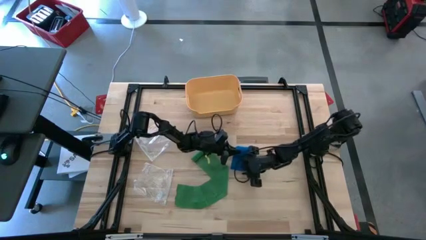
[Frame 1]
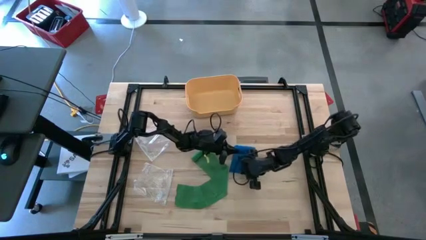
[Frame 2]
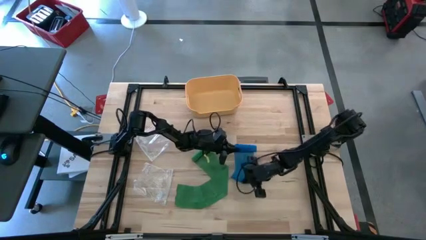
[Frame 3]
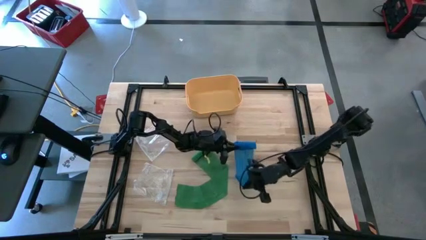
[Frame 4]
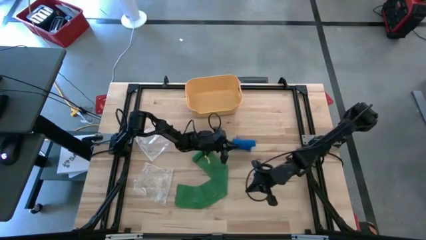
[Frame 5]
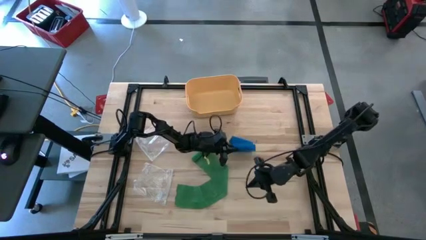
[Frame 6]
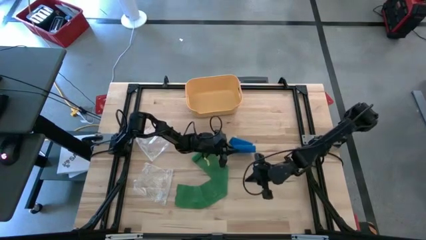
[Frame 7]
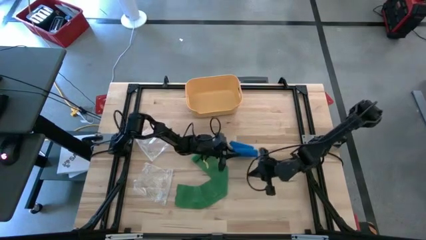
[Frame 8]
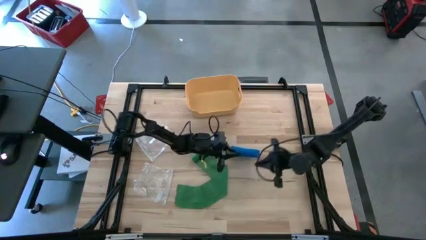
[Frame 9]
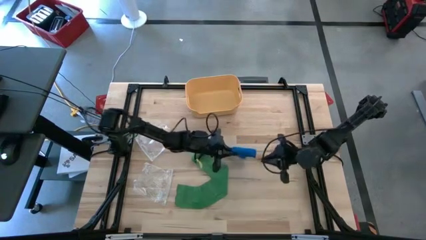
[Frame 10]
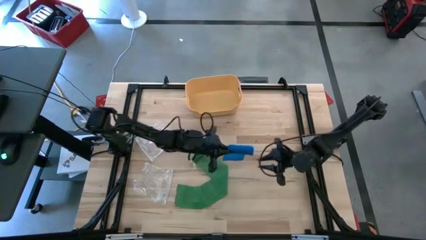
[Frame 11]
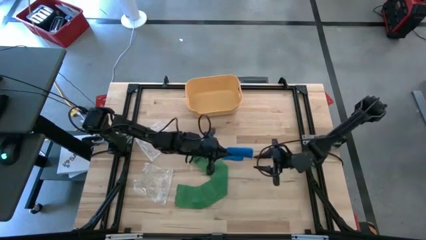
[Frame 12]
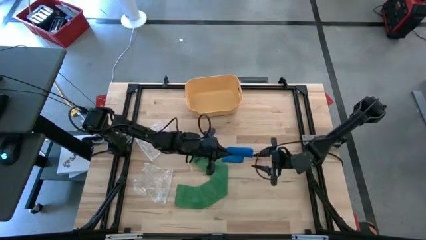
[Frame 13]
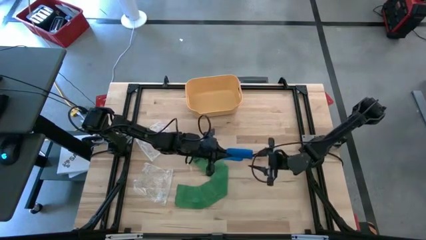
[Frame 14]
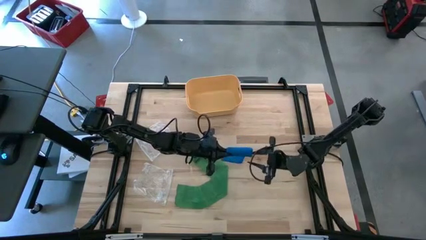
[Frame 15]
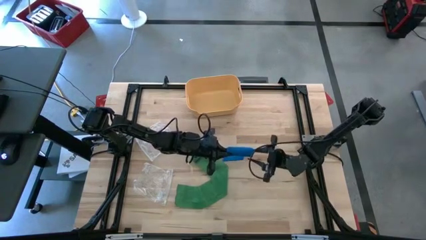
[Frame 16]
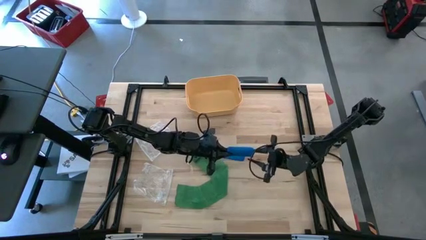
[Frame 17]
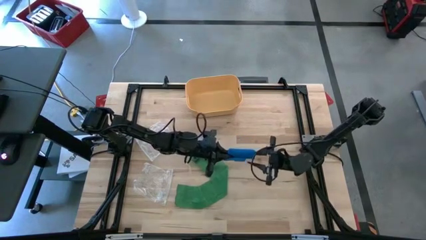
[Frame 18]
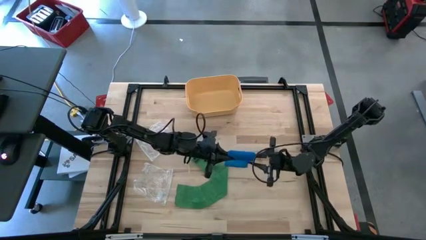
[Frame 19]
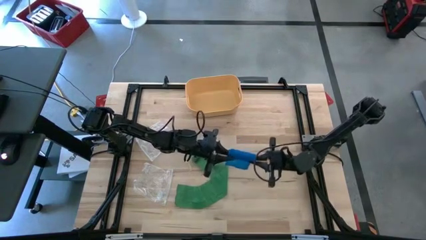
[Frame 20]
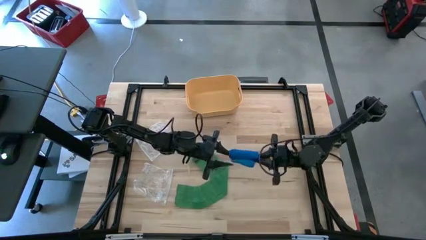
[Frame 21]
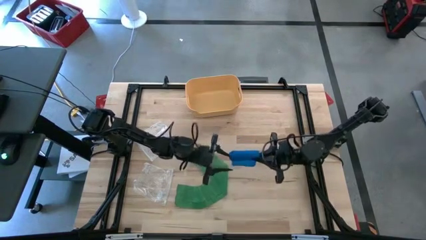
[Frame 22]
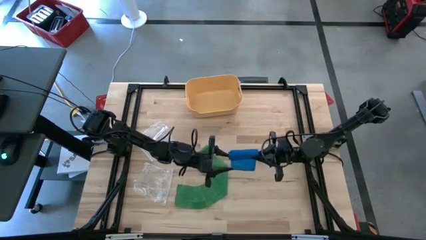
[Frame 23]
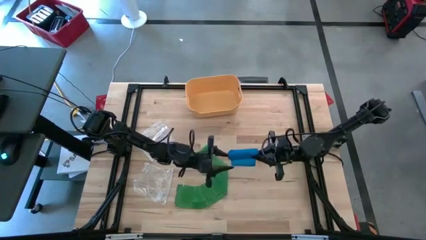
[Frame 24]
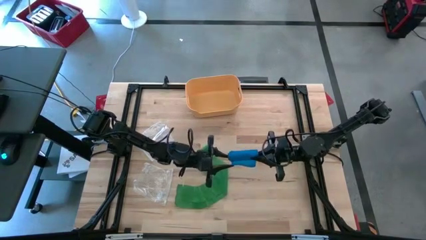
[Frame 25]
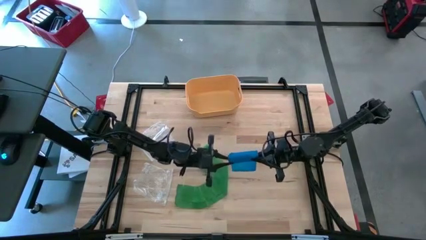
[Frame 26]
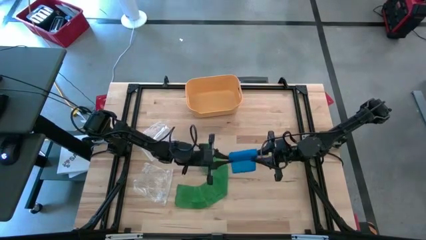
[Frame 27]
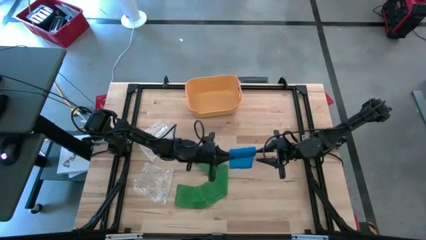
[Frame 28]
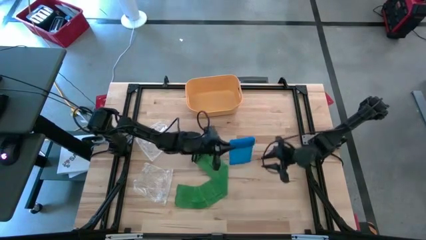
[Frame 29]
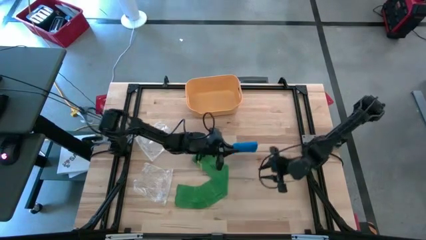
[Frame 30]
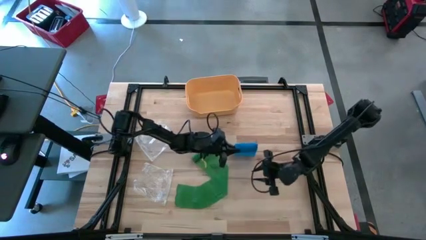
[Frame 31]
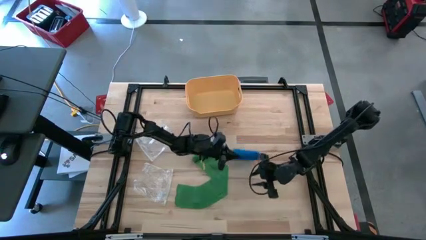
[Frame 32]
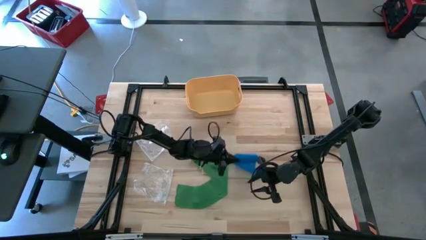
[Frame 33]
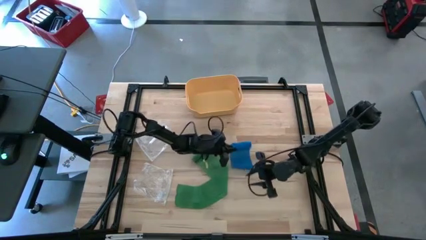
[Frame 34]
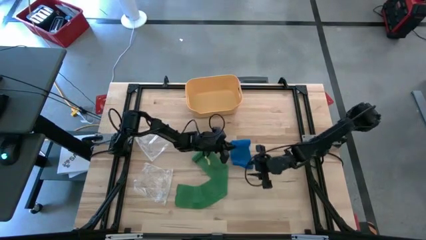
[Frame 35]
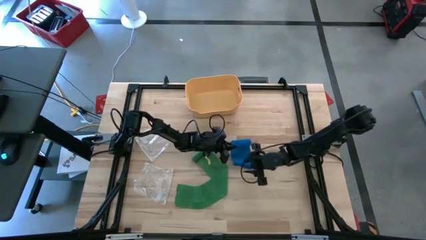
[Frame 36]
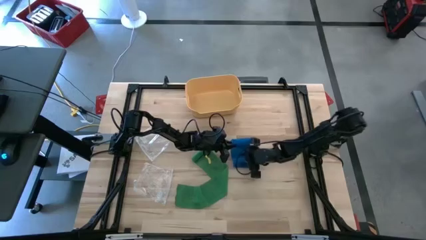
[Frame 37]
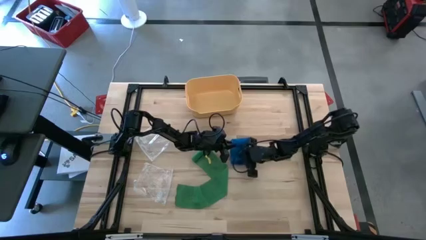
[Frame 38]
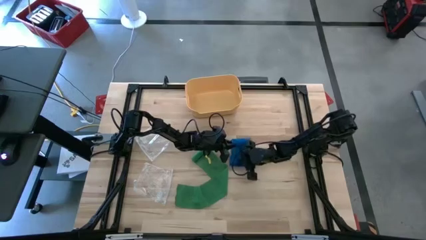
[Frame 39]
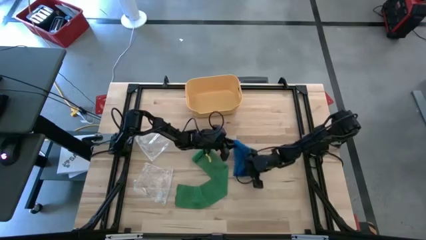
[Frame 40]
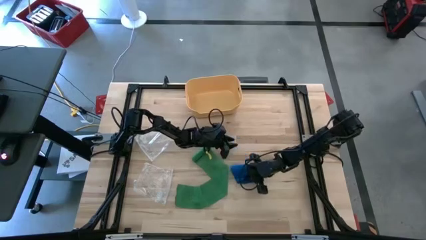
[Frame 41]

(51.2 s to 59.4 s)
Task: Roll bandage
Roll the blue bandage

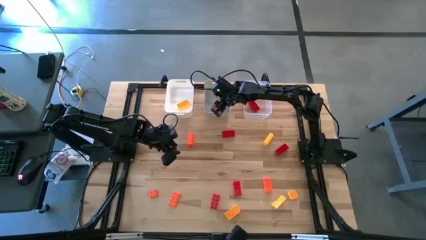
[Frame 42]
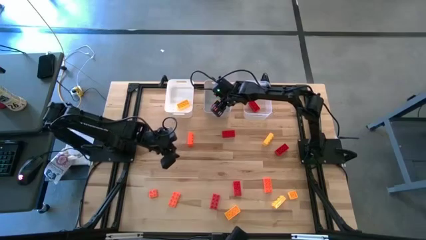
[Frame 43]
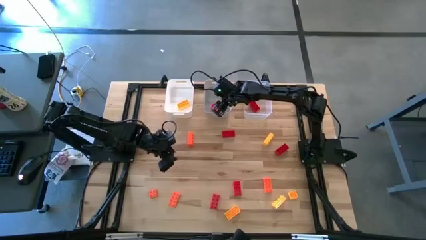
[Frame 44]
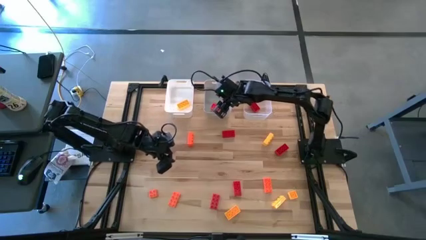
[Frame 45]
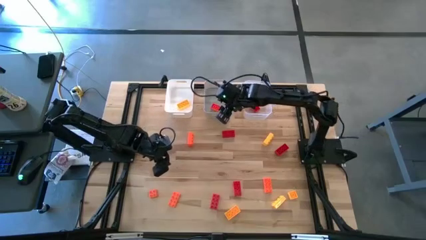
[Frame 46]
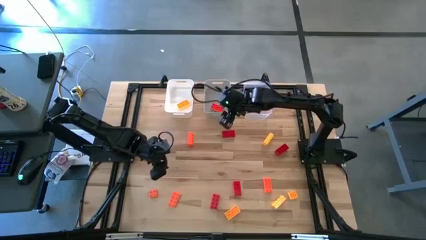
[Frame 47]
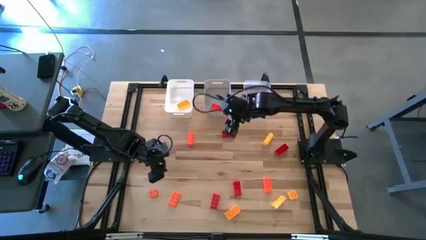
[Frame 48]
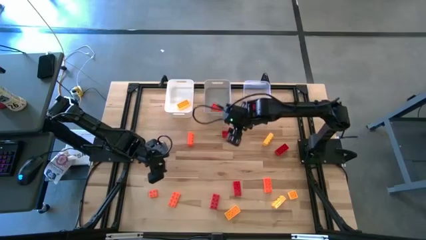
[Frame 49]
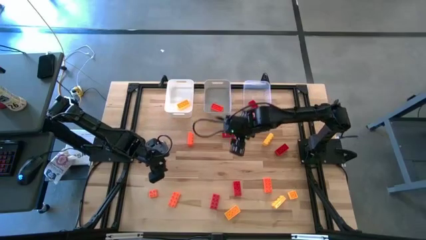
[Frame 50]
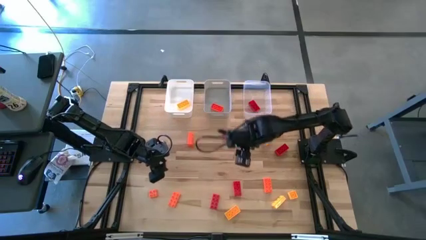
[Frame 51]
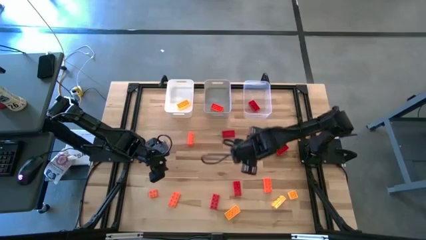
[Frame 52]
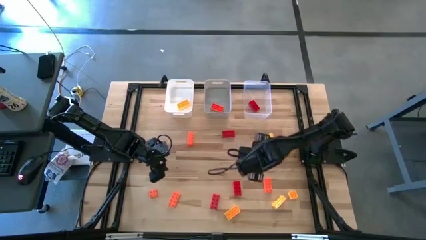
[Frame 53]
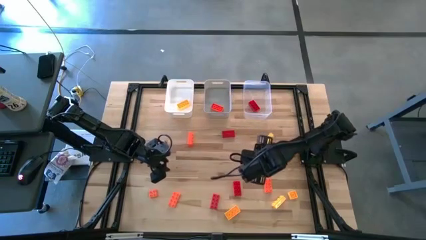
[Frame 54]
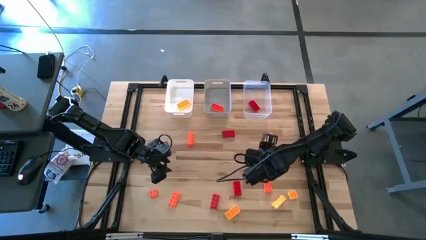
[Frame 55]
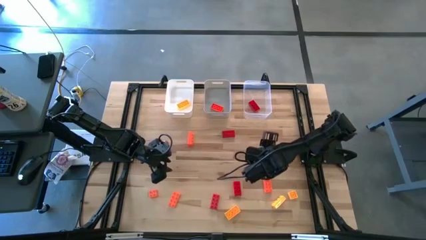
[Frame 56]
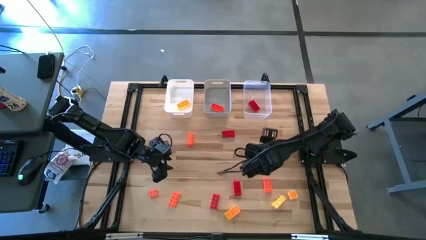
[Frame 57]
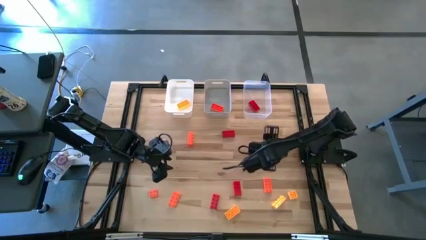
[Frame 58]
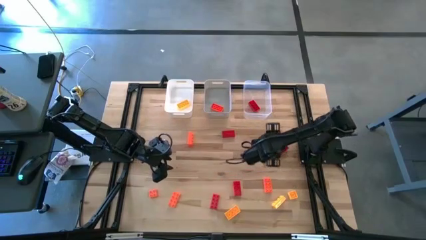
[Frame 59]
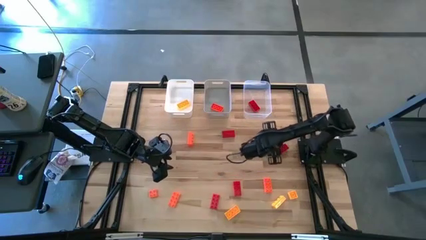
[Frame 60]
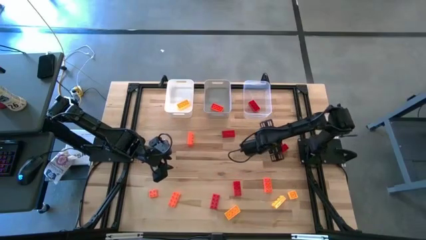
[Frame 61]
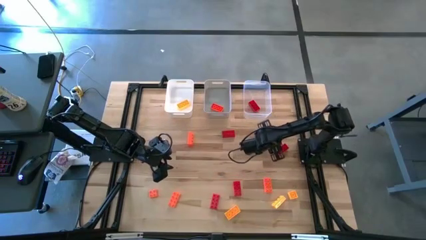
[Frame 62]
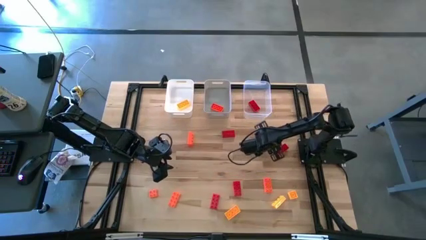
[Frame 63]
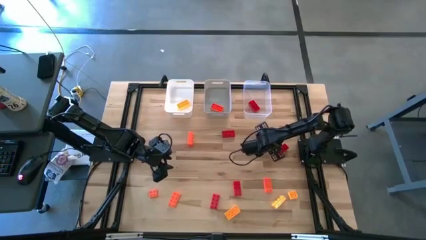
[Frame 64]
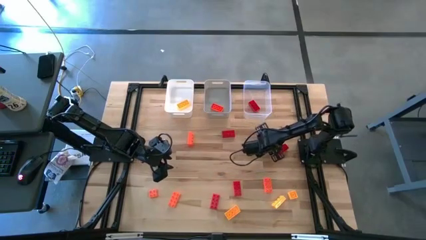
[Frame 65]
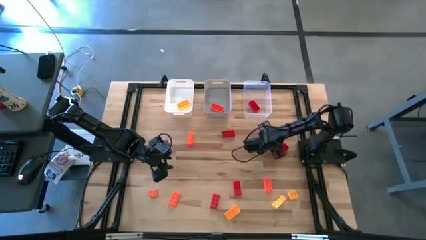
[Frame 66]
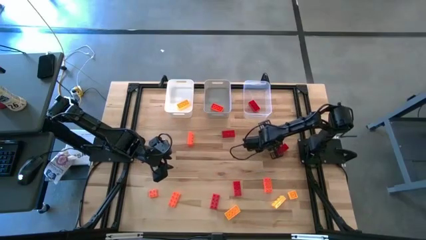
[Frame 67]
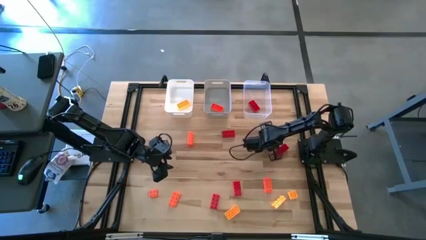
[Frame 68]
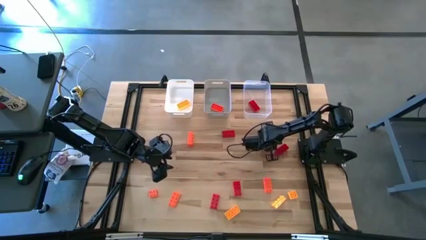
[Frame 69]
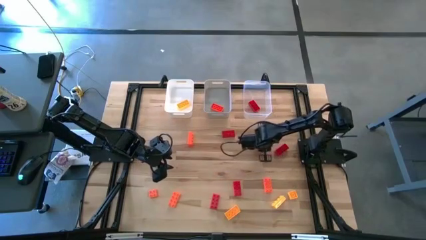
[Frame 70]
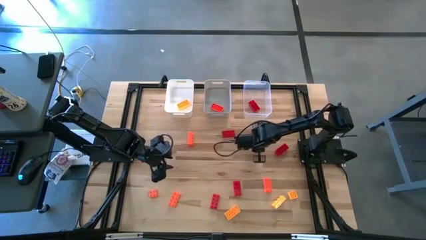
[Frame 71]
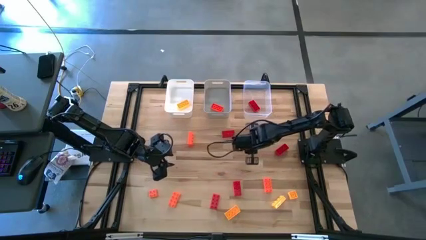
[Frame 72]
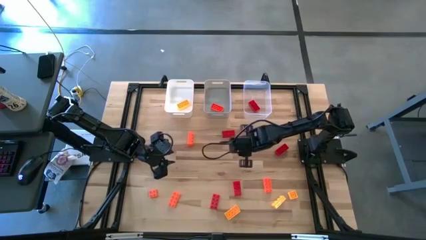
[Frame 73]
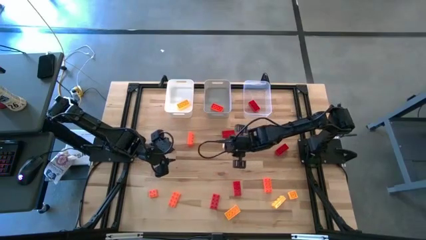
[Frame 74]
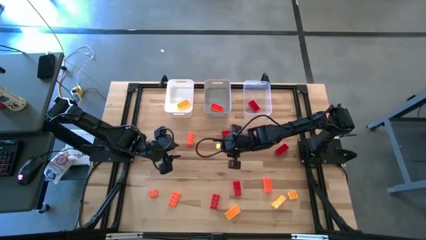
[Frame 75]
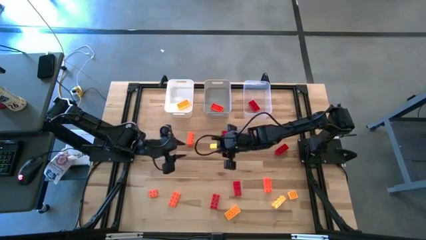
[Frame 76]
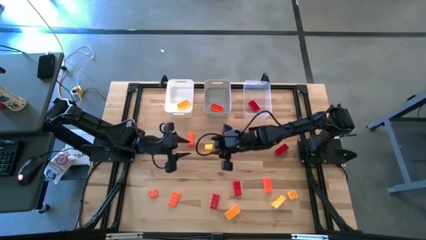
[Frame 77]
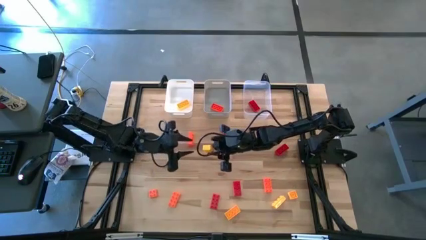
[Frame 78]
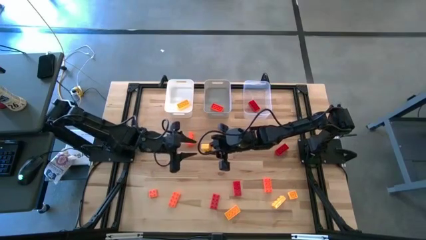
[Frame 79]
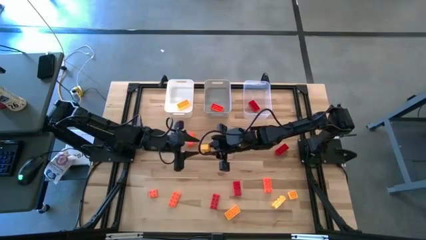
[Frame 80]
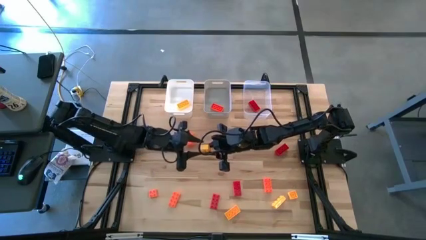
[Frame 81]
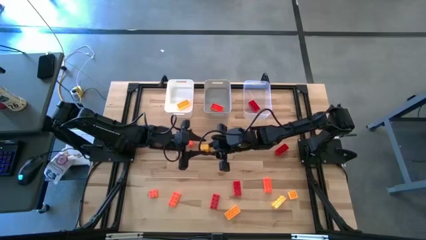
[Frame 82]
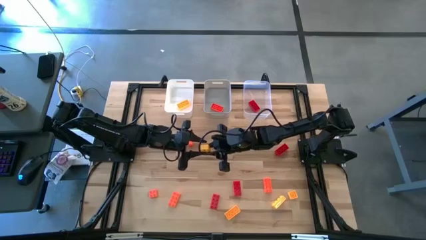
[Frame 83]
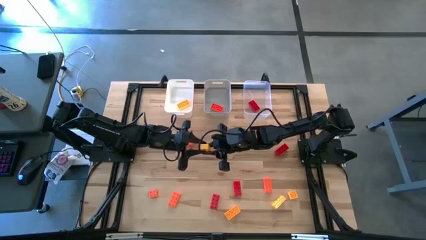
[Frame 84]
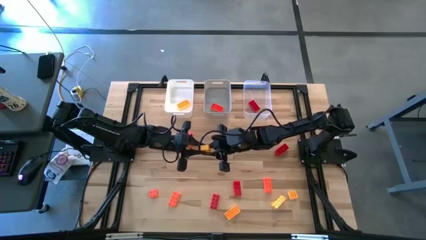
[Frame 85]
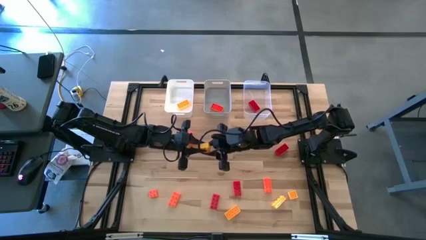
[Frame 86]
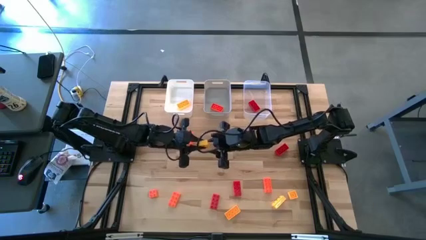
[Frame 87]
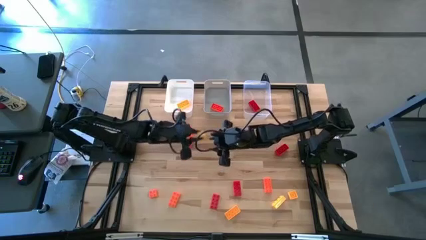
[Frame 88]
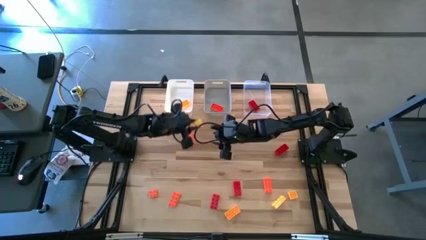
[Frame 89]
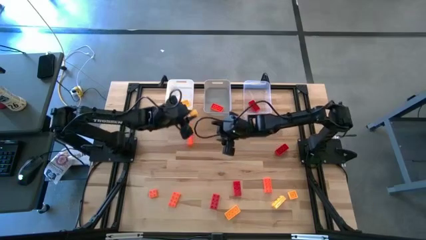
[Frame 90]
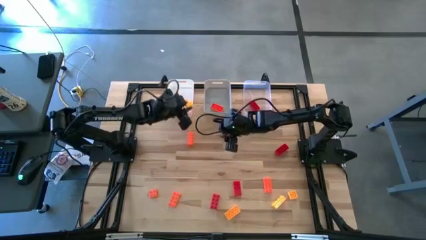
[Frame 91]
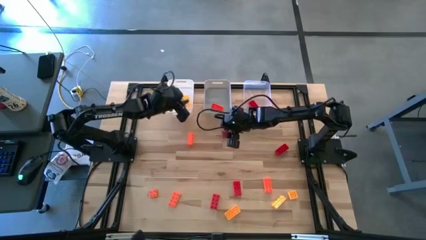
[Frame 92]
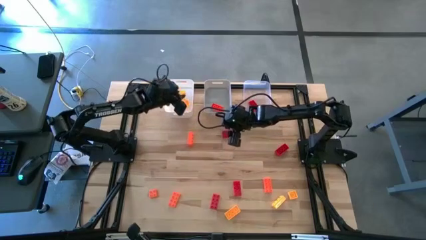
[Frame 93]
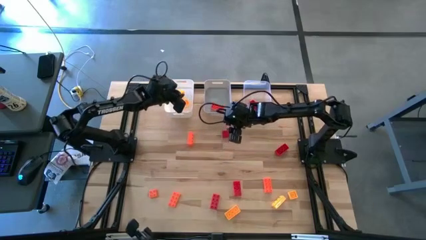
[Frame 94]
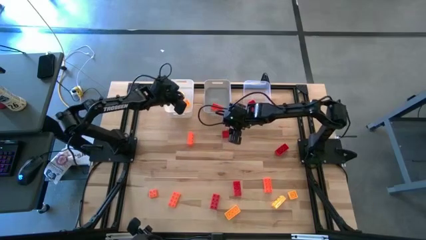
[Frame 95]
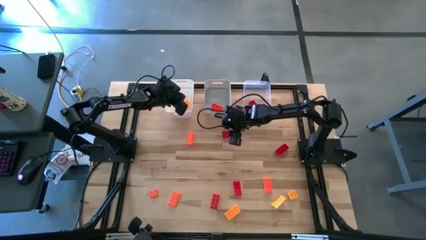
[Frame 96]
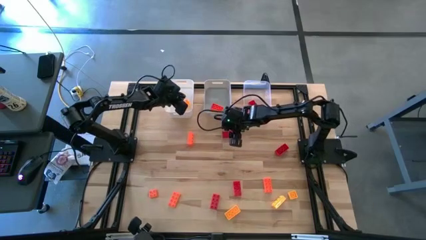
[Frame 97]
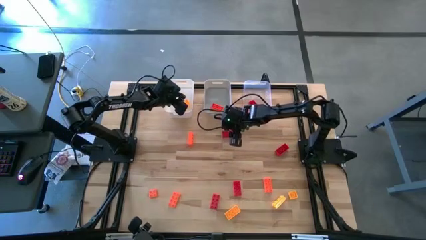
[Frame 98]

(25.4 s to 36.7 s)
Task: Sort & place blocks by color
Put the yellow game piece into the white bin
